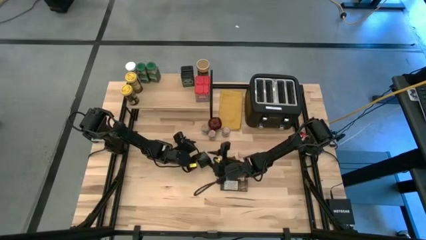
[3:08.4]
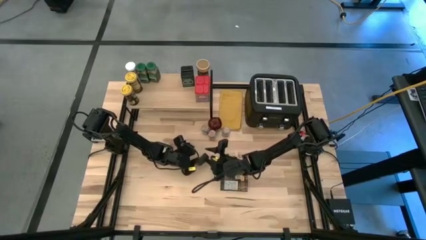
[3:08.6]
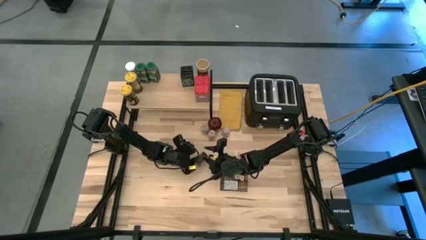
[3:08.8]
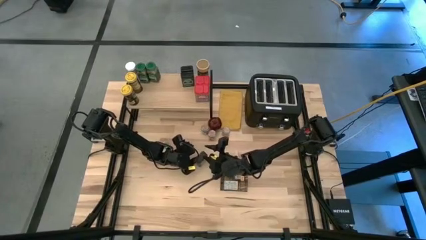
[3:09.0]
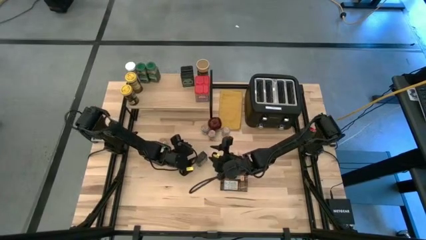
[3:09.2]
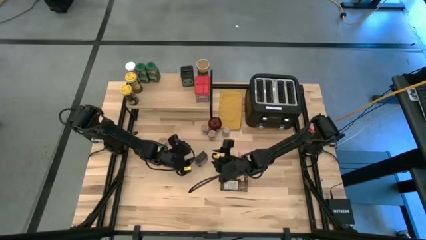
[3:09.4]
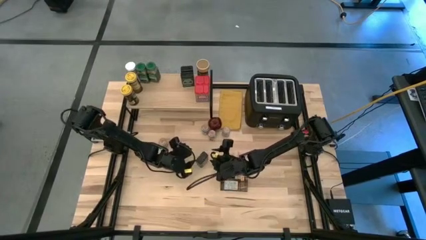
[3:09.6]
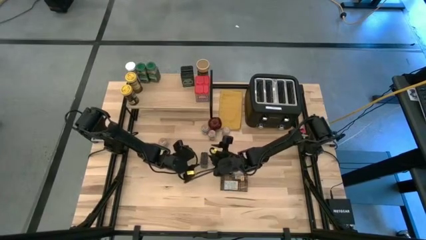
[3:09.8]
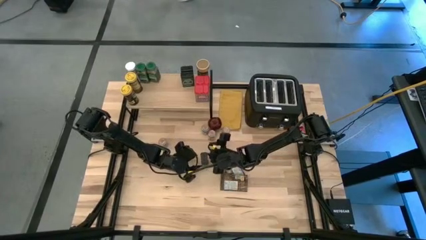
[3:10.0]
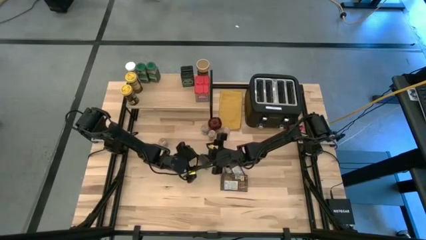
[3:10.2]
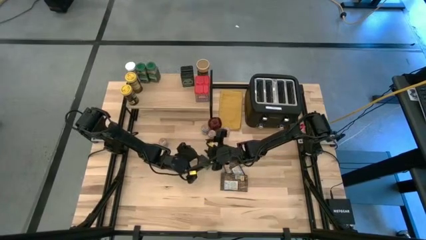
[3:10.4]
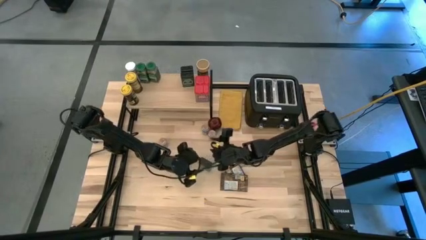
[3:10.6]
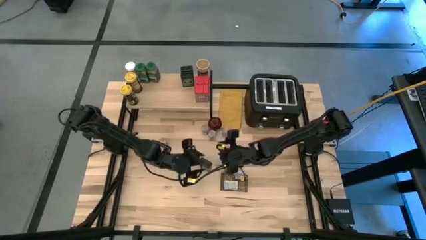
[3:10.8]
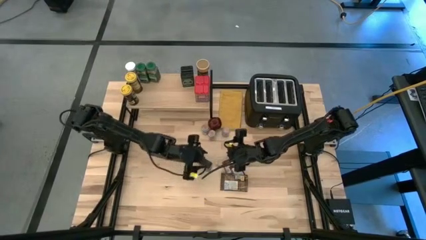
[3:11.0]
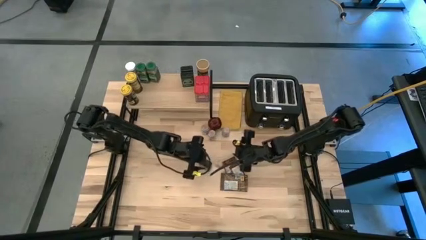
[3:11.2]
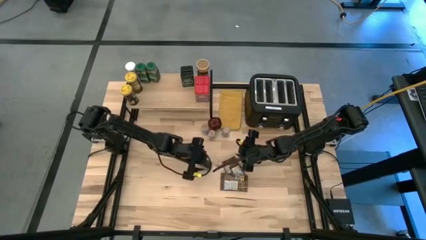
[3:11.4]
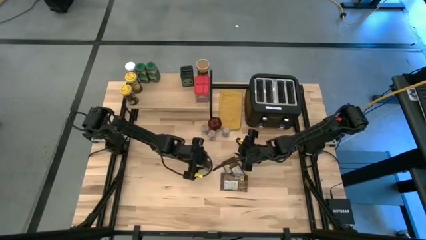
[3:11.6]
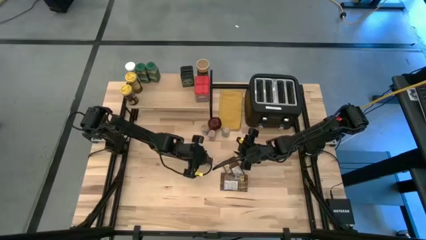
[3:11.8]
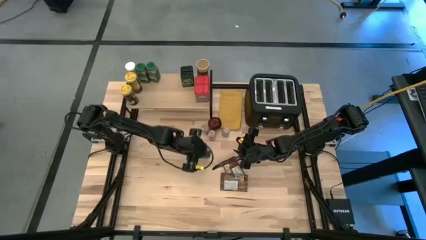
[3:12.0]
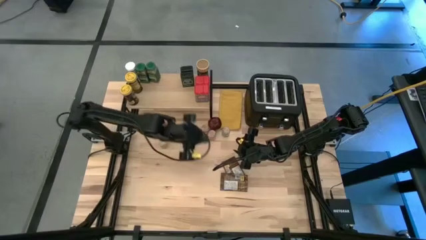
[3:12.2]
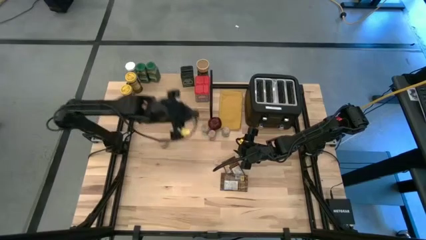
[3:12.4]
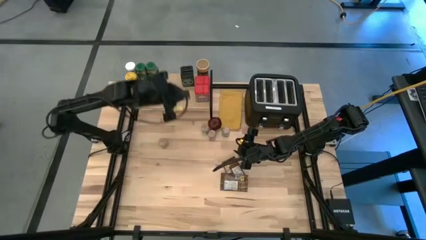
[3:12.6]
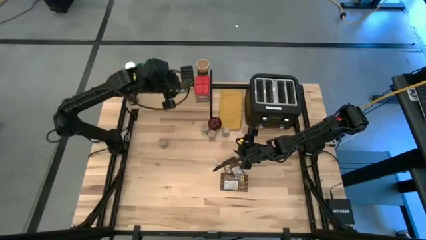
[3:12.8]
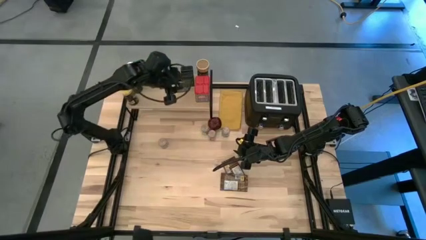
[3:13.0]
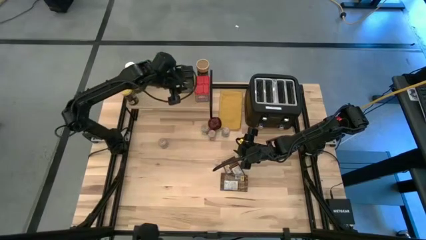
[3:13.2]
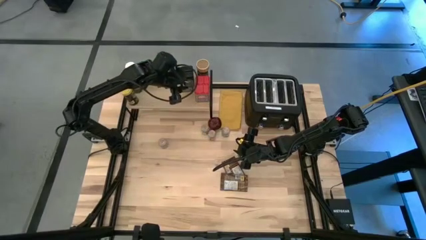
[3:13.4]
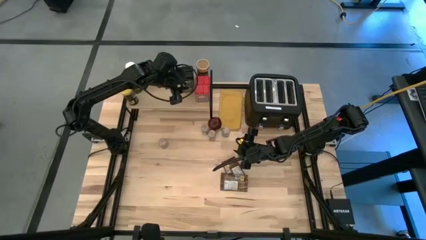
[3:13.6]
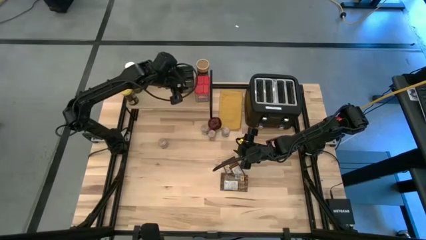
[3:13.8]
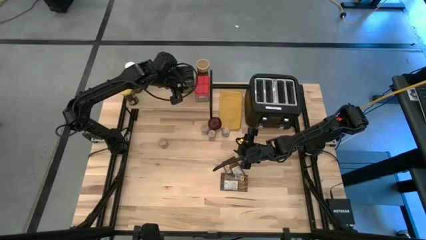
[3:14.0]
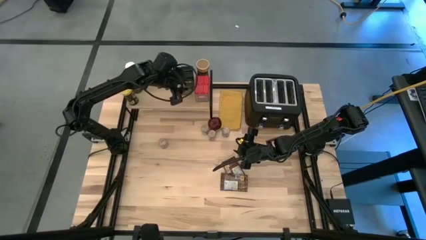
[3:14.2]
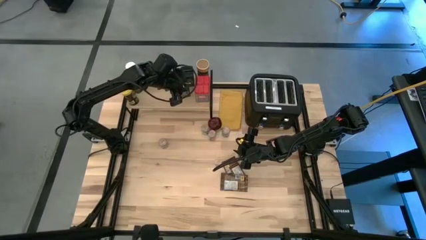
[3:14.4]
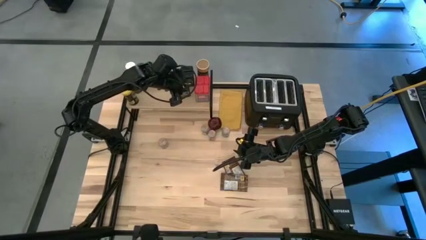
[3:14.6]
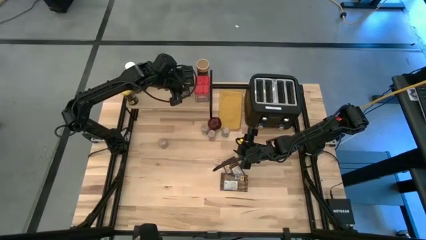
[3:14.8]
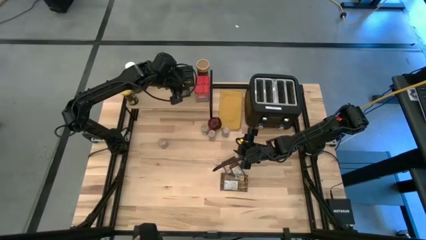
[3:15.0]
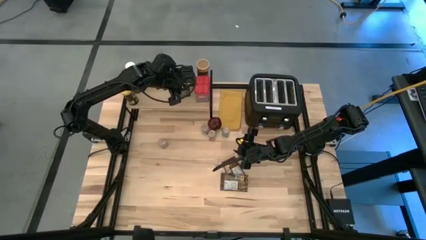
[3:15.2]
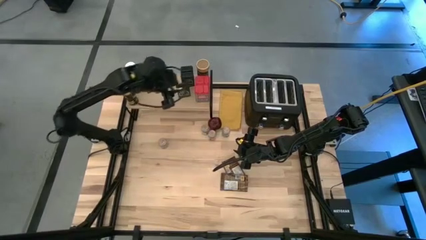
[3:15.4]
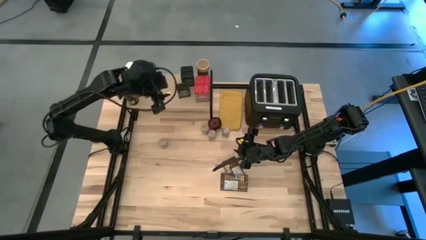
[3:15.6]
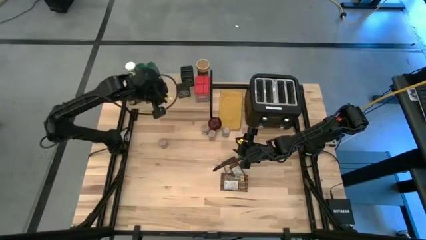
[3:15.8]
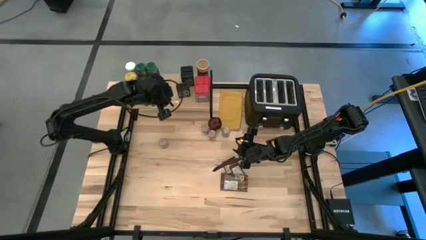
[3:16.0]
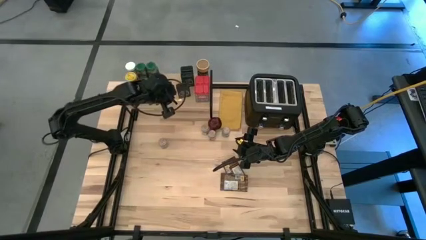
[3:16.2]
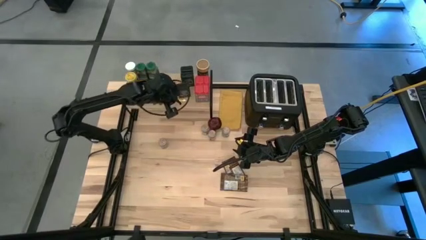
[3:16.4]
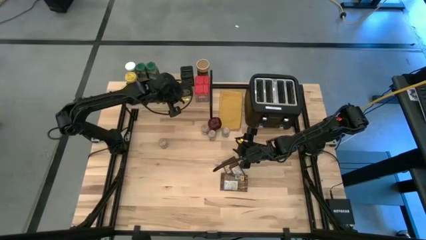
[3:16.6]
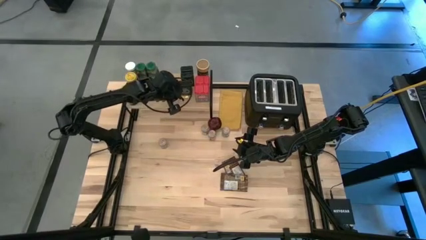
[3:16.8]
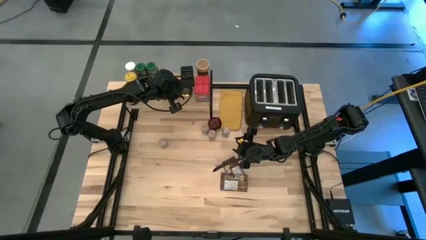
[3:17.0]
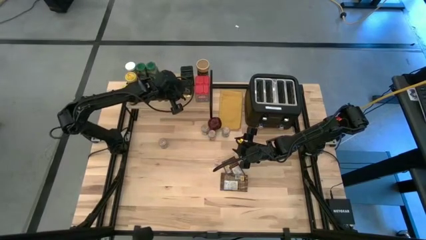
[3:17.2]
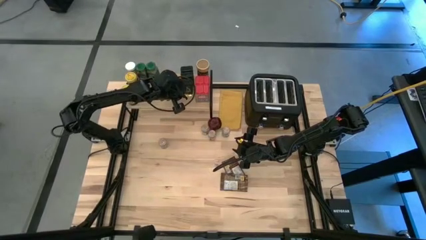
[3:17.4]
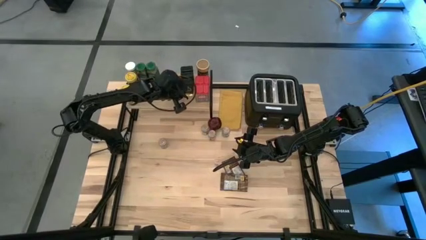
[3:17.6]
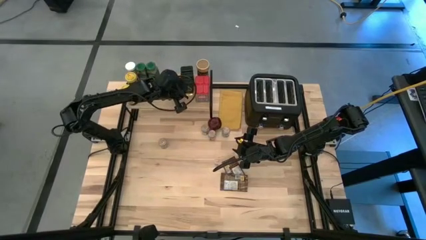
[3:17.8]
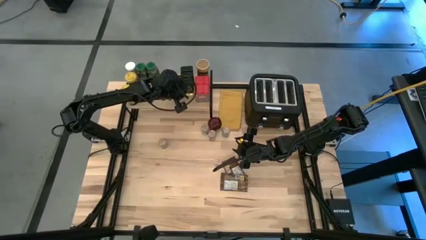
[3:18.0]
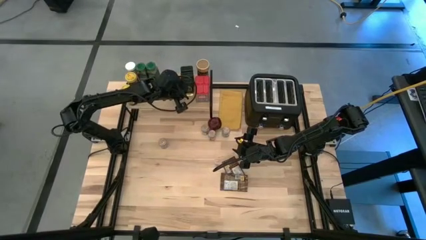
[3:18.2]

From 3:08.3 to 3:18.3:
Task: Shelf spices
Put the black seasoning can aligned with the other black seasoning cans on the shelf

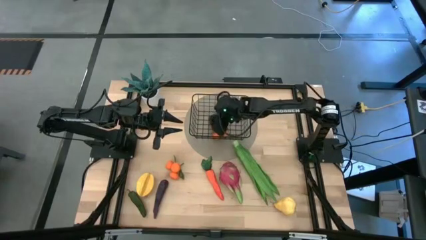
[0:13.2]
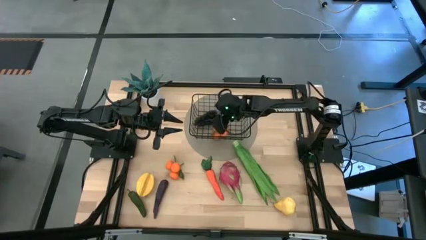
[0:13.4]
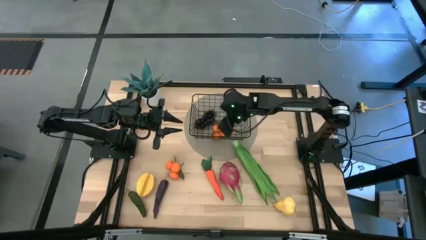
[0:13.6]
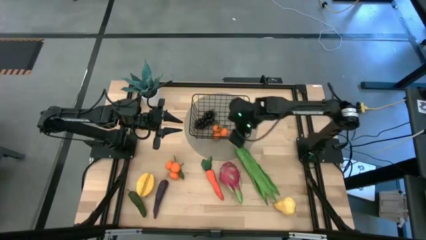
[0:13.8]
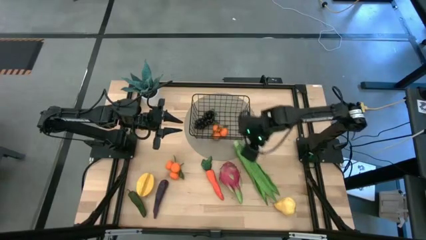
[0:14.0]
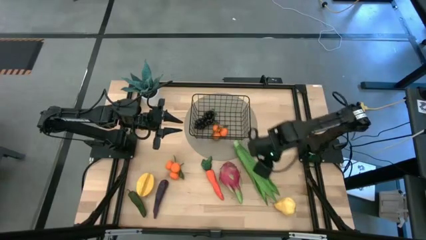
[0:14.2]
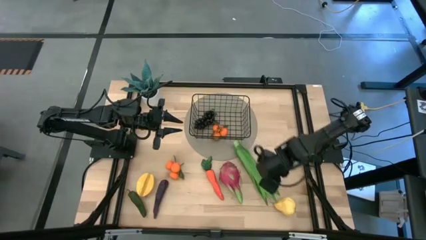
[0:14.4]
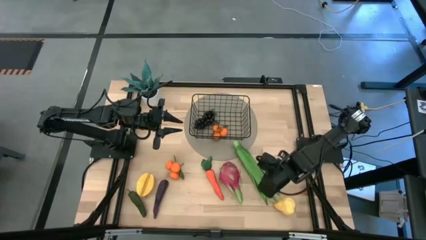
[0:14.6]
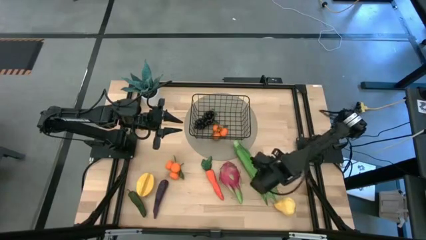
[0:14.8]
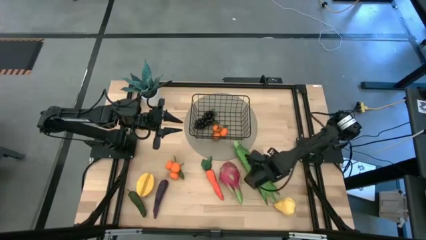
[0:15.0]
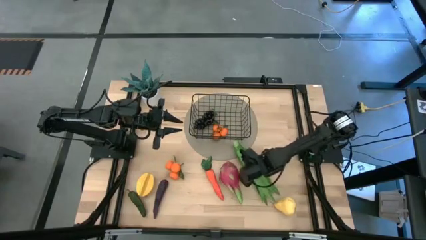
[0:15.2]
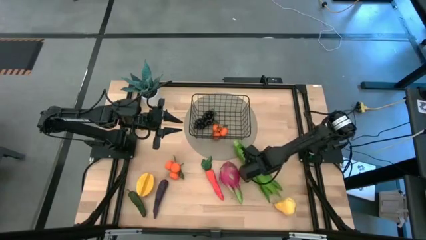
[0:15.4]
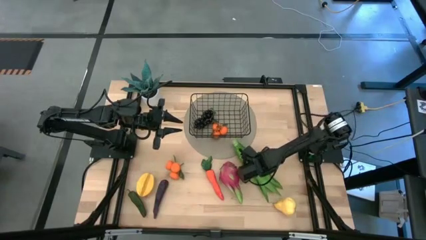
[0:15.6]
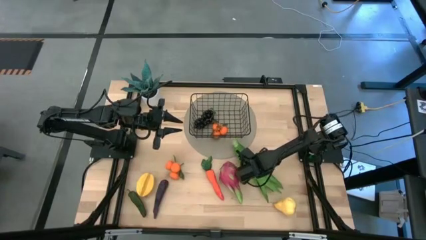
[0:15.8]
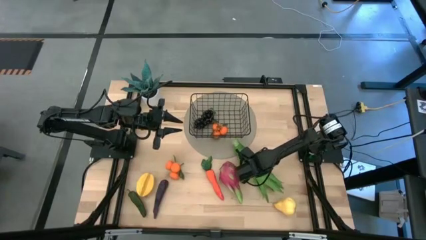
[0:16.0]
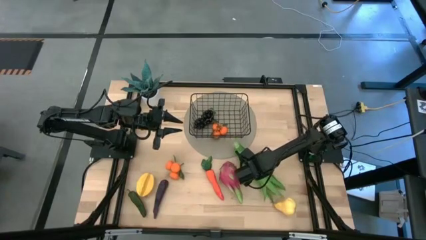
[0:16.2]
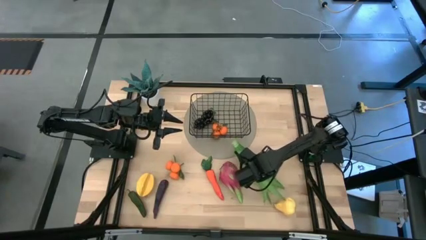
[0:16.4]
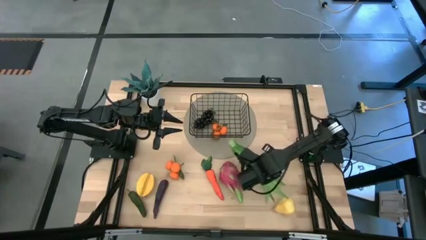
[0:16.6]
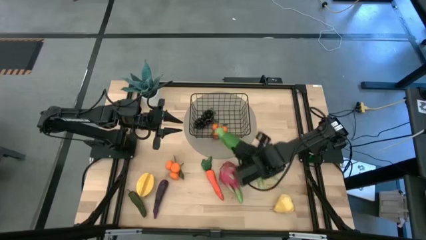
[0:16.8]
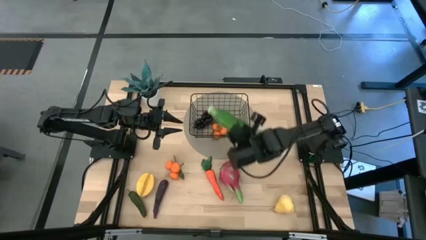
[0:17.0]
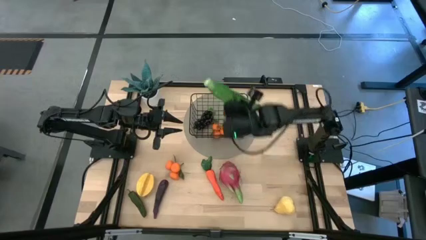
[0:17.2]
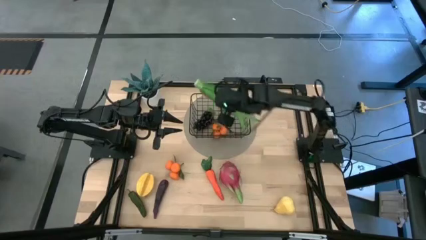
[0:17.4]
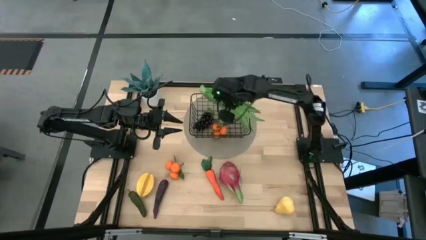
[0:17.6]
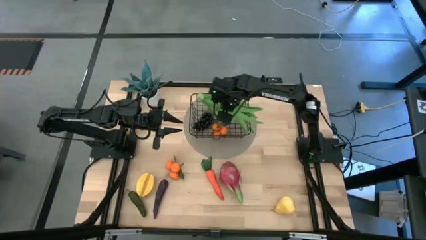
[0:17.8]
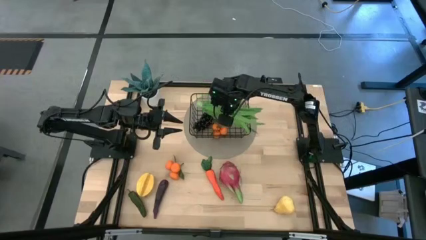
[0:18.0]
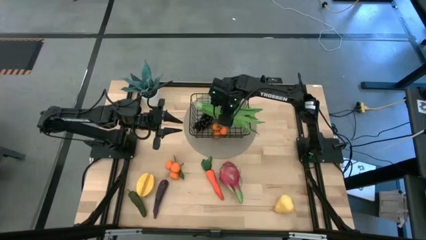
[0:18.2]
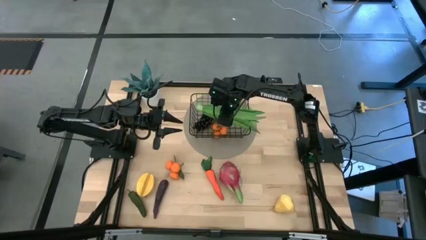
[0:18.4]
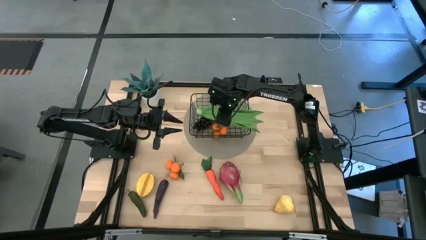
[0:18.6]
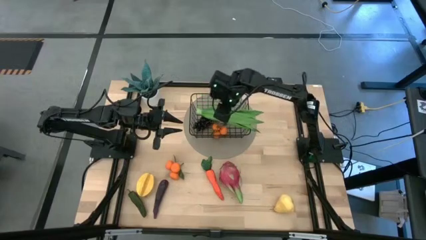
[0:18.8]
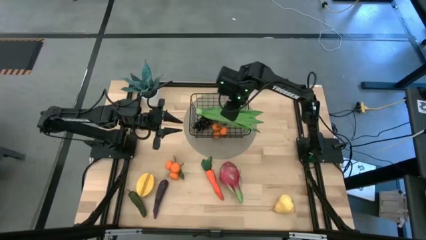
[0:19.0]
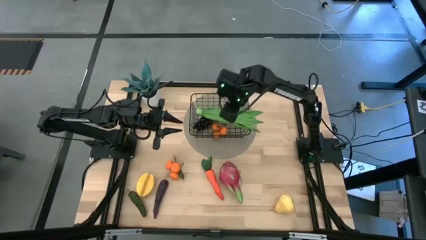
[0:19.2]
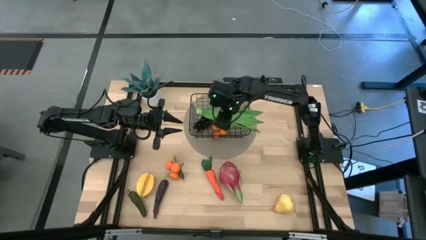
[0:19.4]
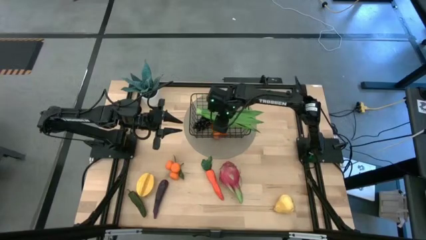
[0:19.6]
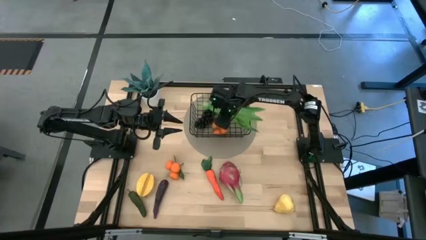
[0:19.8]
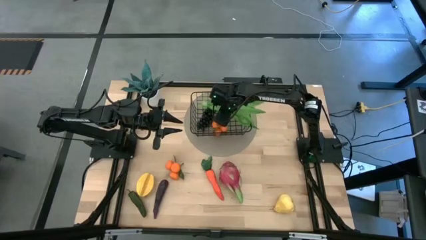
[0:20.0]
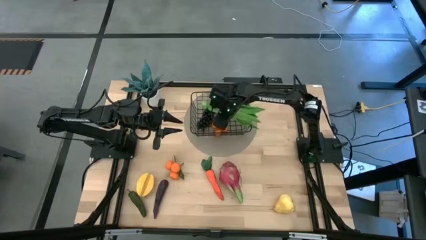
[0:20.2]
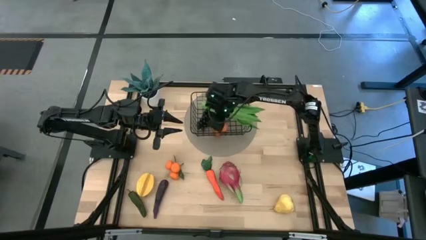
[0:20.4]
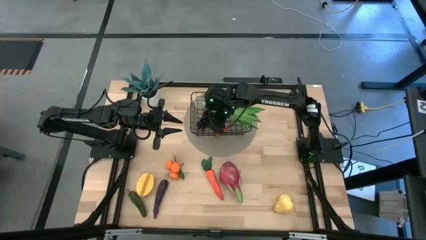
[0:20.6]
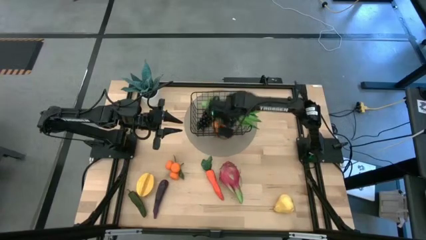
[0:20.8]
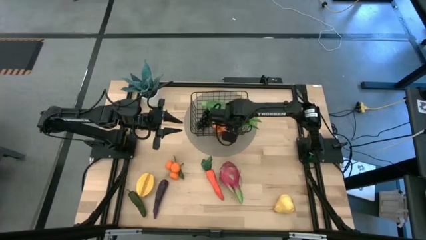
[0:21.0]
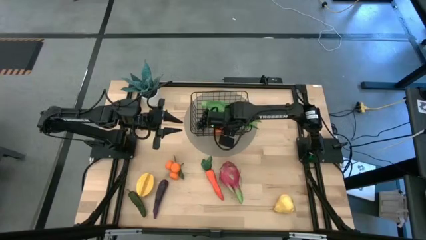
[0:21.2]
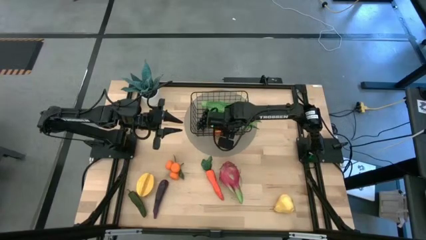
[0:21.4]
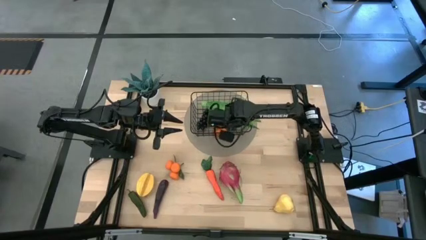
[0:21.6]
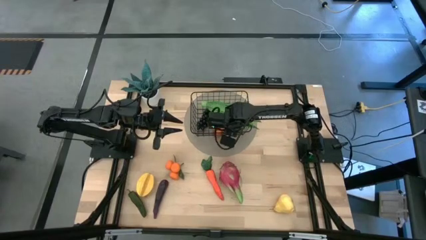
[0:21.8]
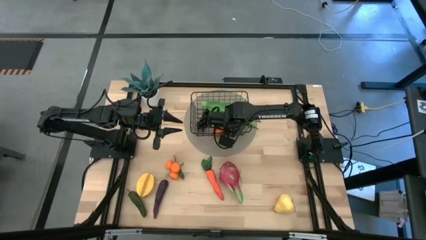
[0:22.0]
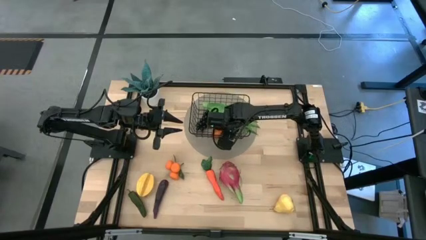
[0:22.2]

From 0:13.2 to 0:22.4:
Task: Build produce basket
Put the leaf lettuce into the wire basket
